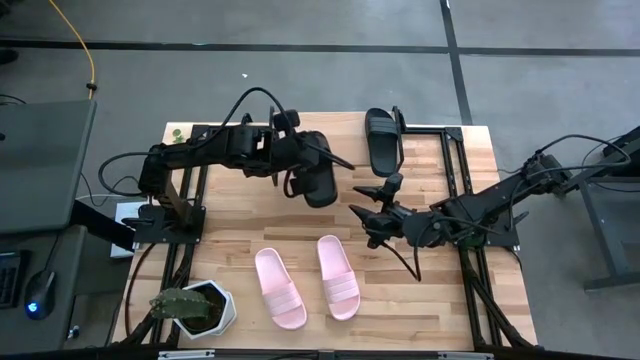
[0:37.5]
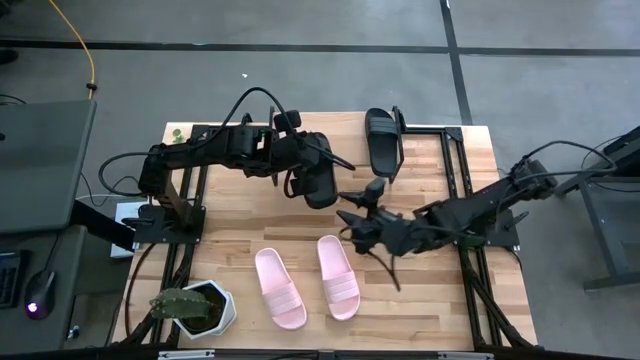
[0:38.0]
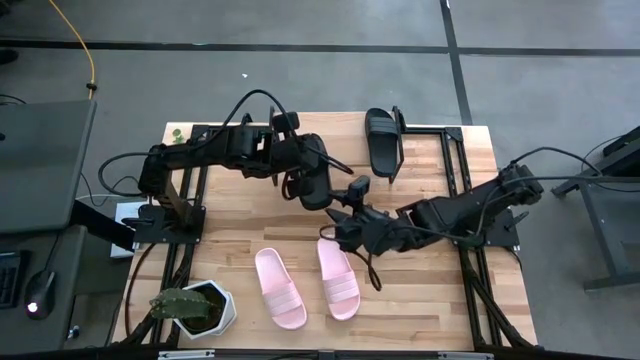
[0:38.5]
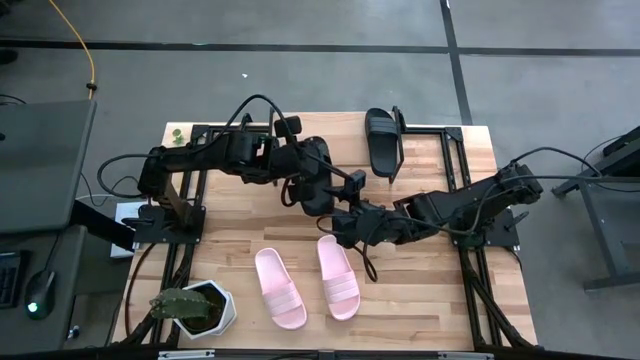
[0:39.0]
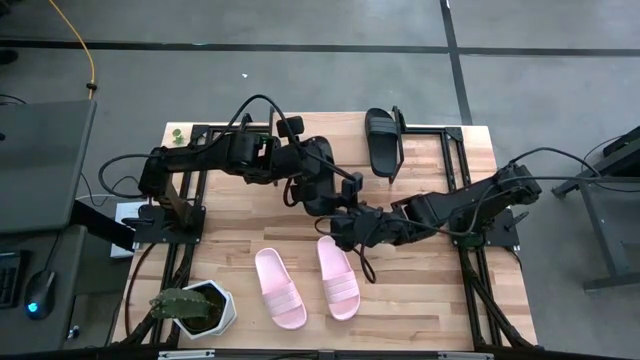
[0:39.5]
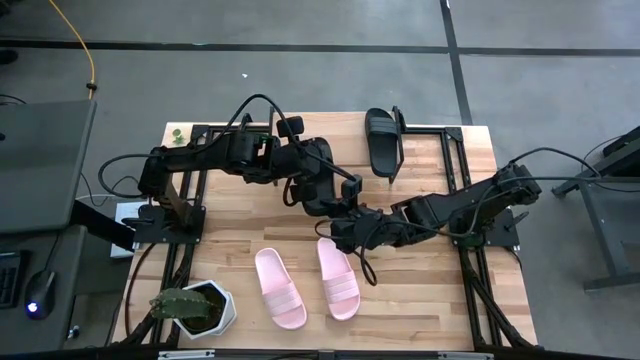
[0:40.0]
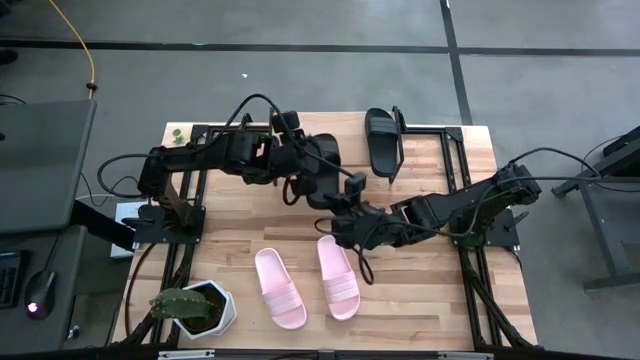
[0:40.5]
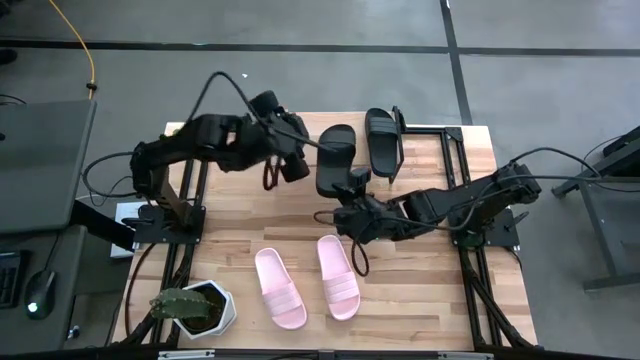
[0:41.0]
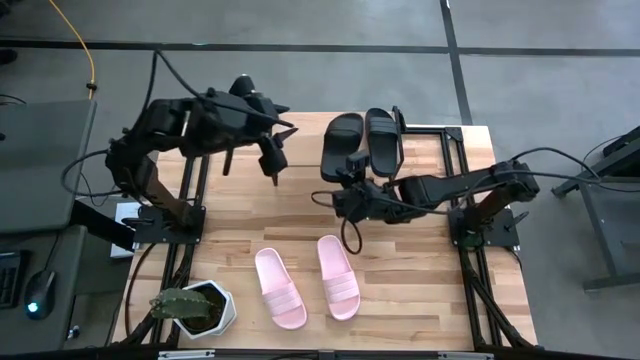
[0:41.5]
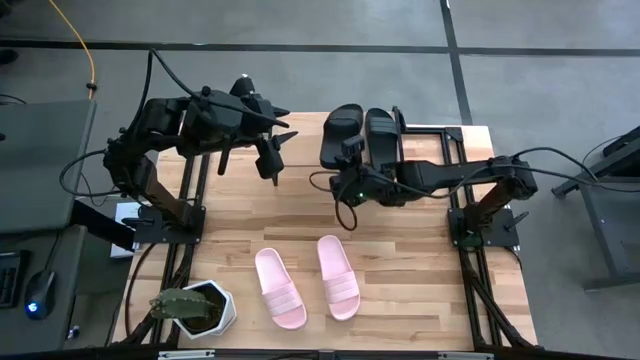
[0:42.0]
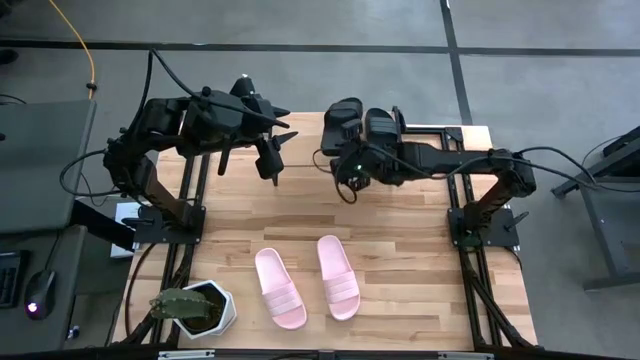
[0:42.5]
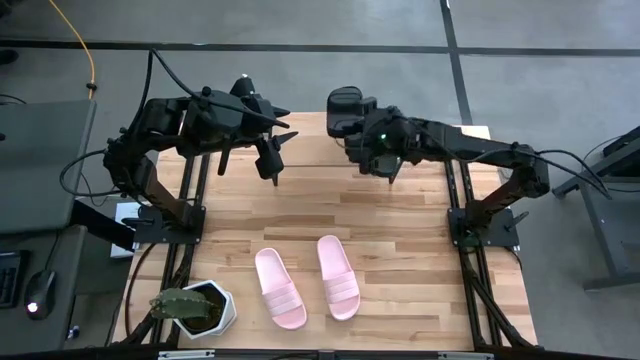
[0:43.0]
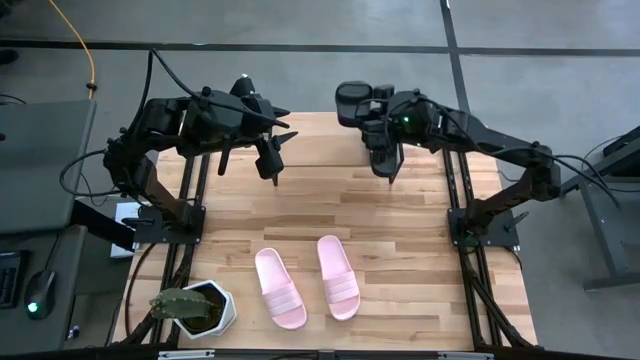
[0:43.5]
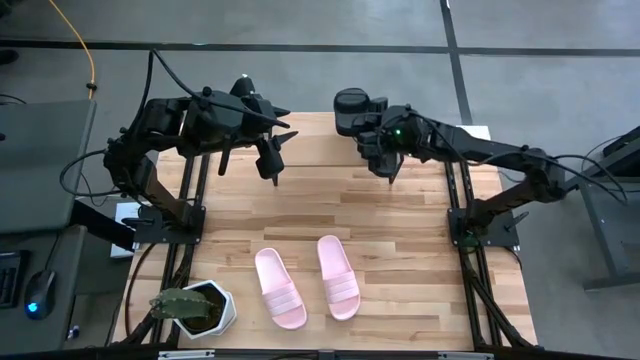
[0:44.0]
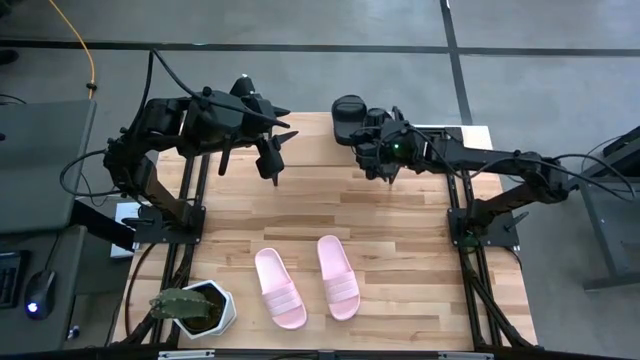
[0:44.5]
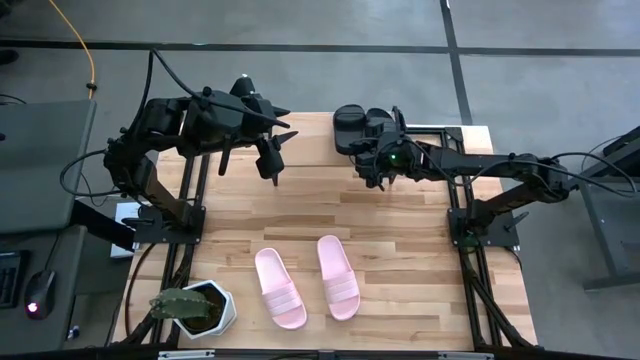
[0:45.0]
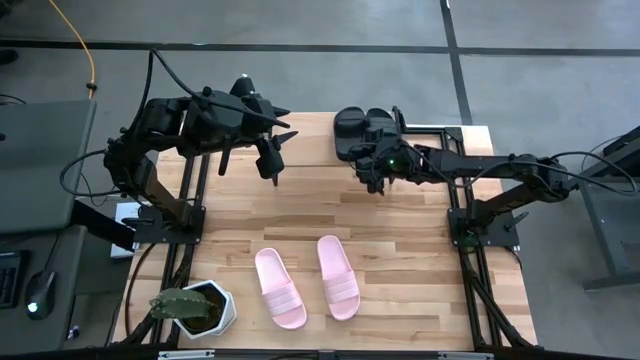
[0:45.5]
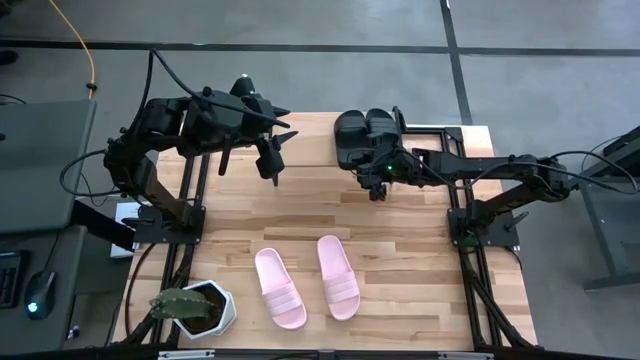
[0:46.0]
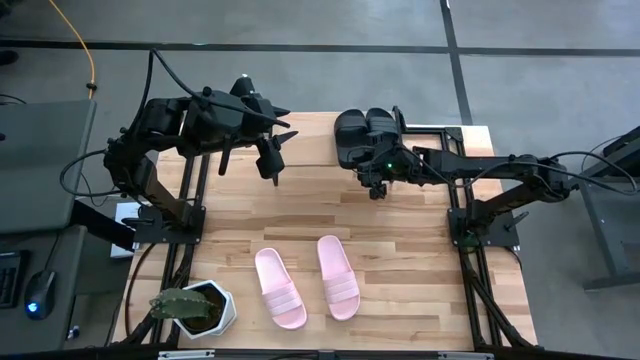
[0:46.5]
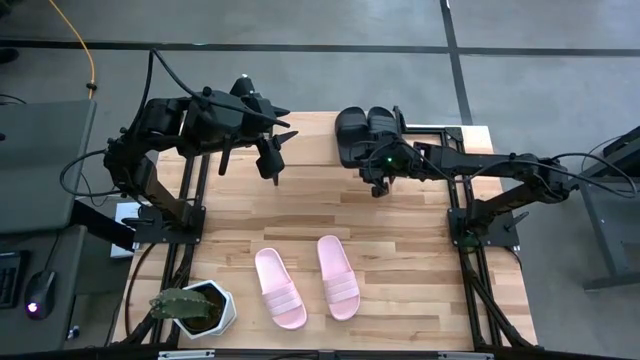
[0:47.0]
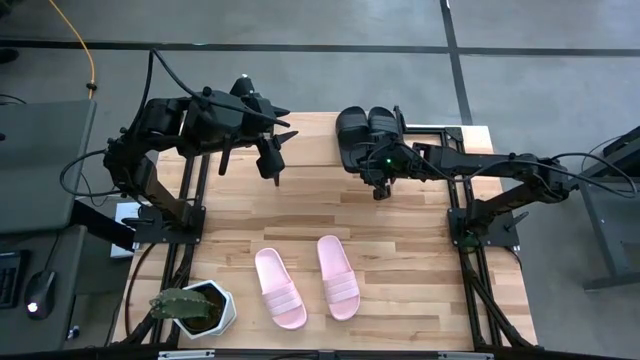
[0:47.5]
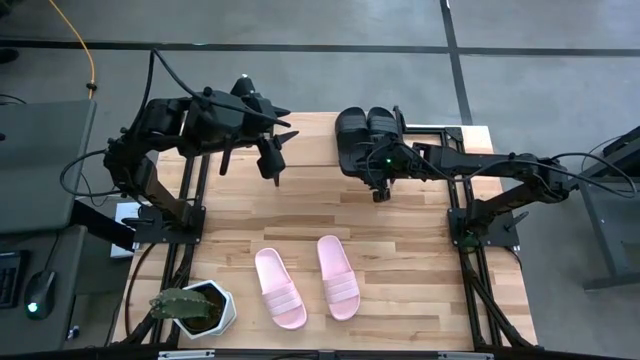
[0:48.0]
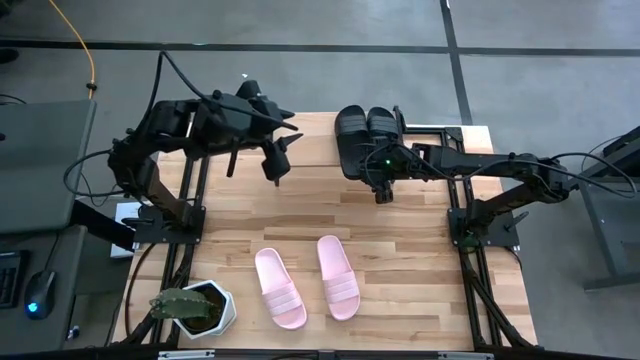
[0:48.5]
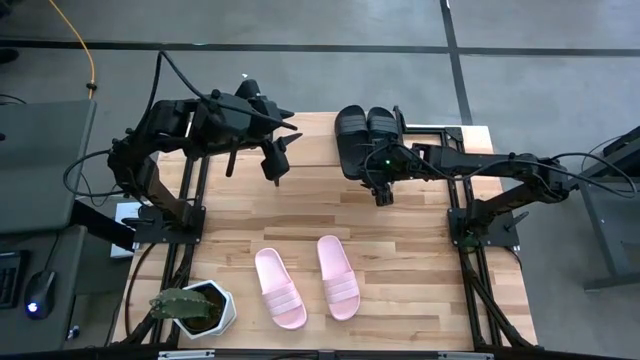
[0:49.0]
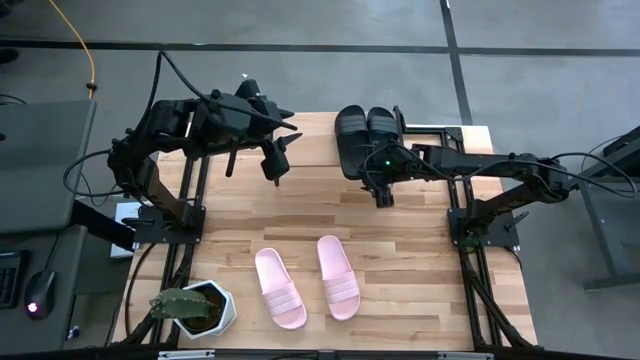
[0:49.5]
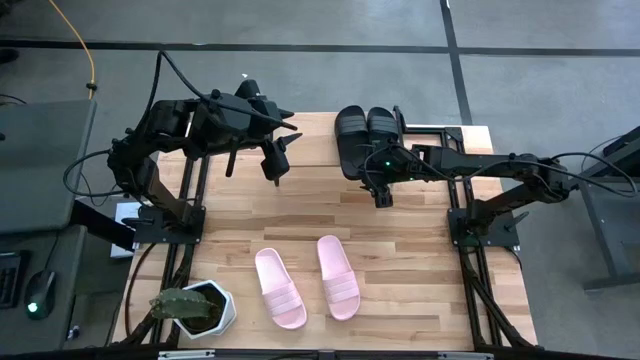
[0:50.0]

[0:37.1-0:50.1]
Task: Pick and place slides into the shelf
Put the black slide on the shelf

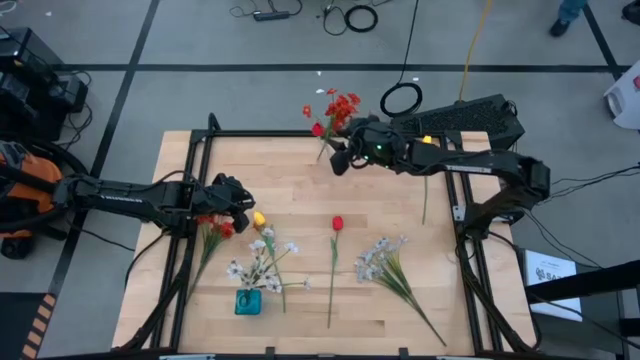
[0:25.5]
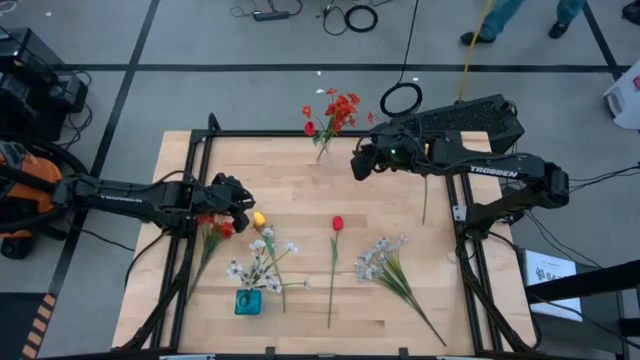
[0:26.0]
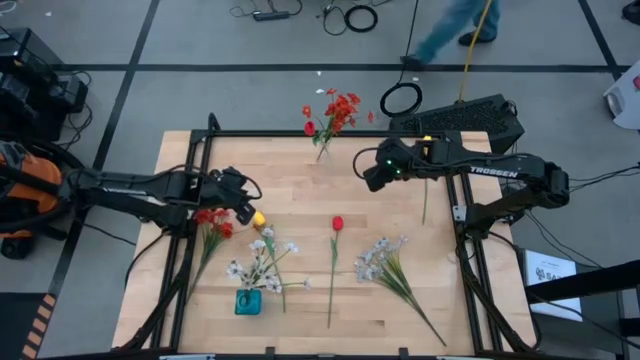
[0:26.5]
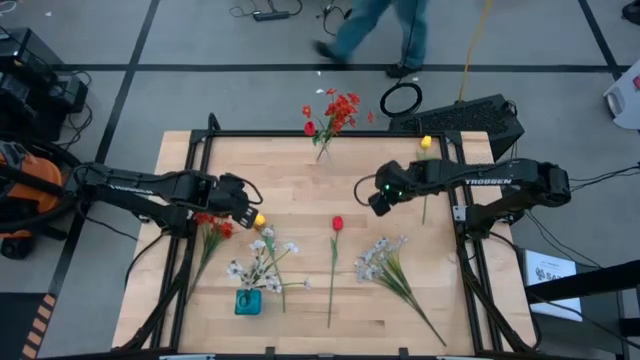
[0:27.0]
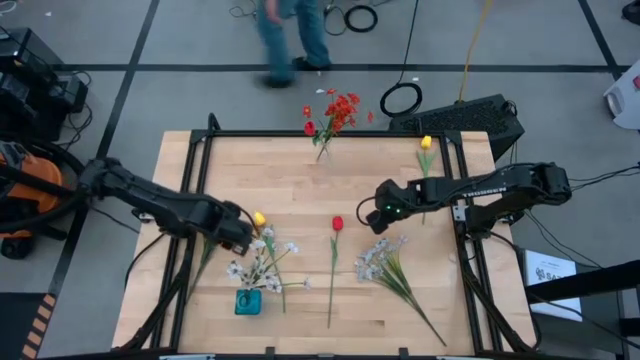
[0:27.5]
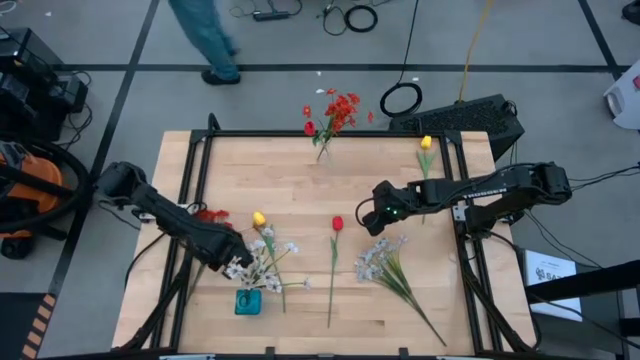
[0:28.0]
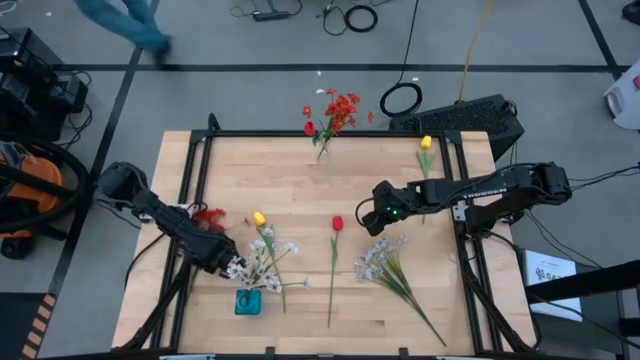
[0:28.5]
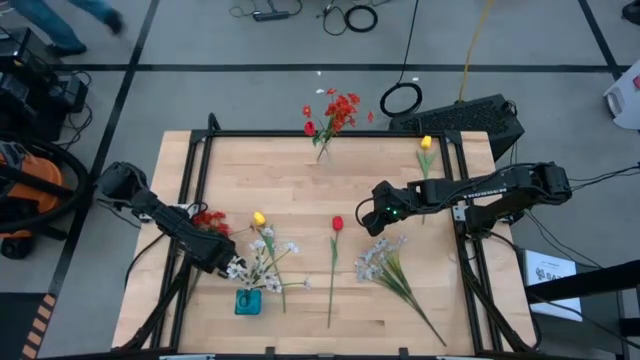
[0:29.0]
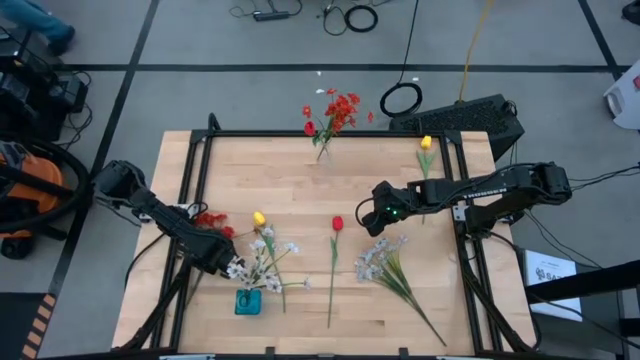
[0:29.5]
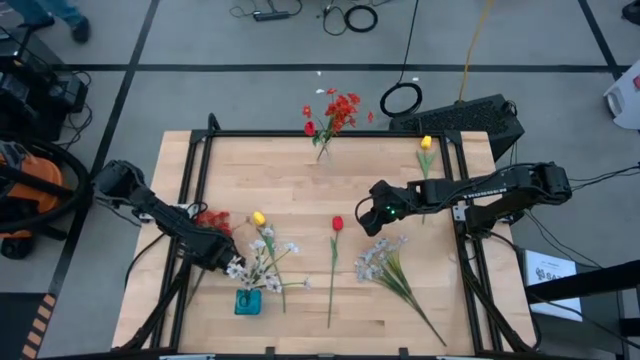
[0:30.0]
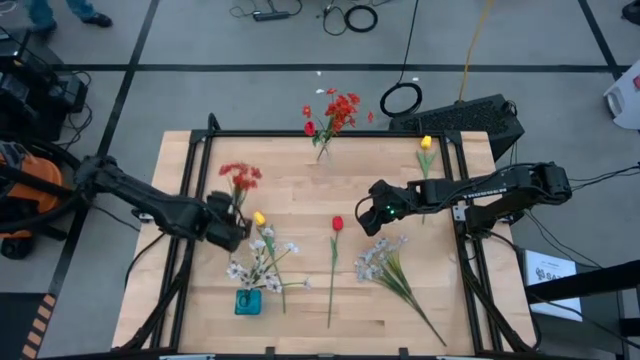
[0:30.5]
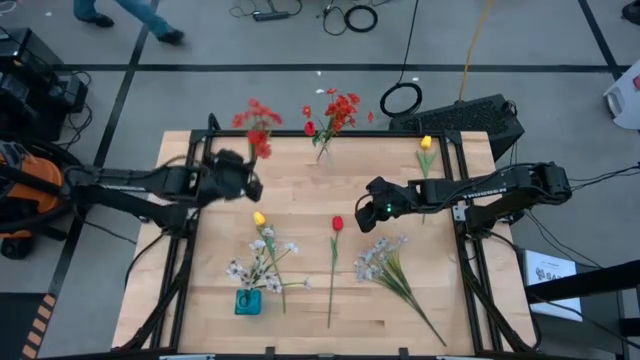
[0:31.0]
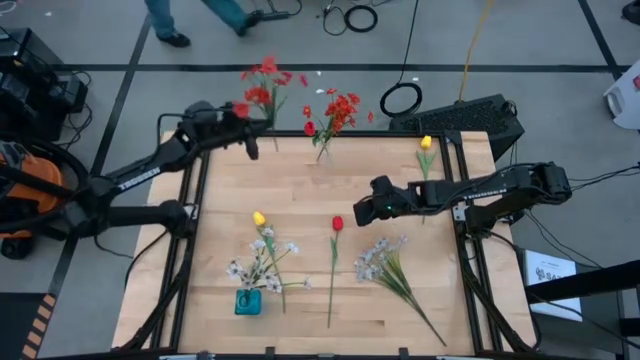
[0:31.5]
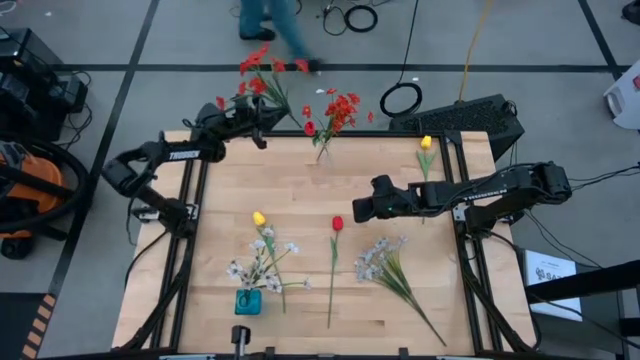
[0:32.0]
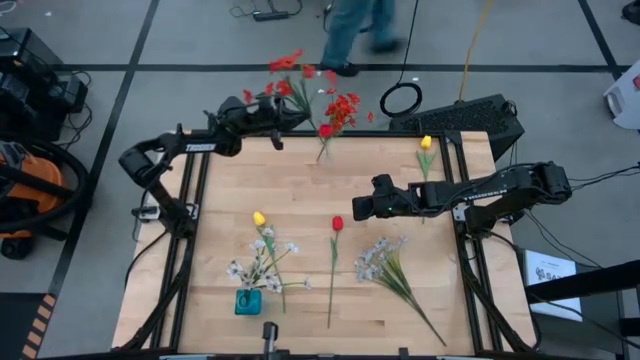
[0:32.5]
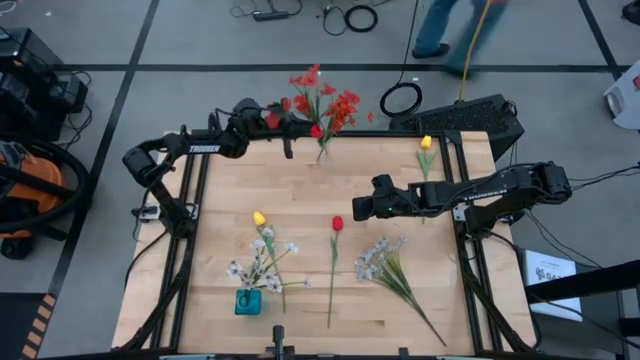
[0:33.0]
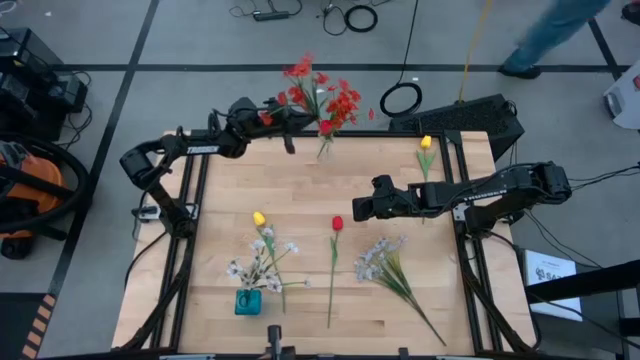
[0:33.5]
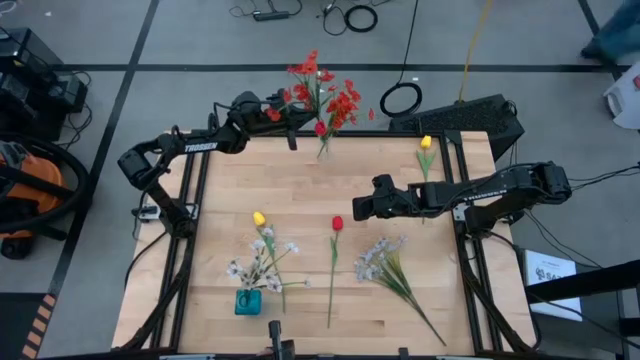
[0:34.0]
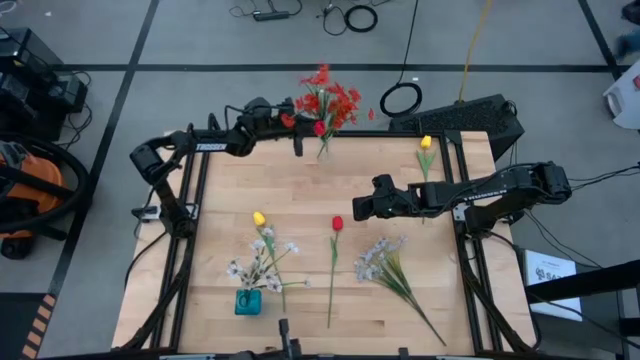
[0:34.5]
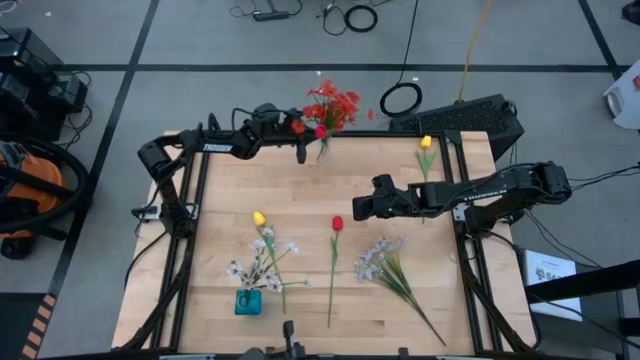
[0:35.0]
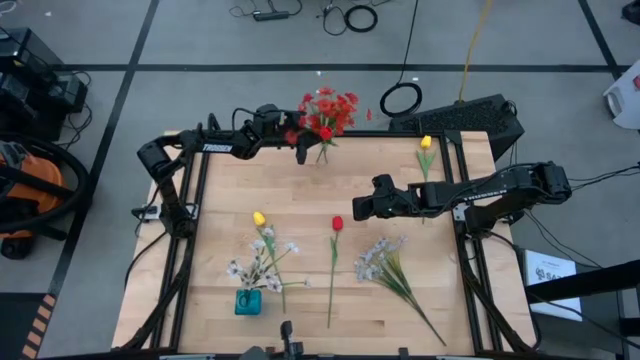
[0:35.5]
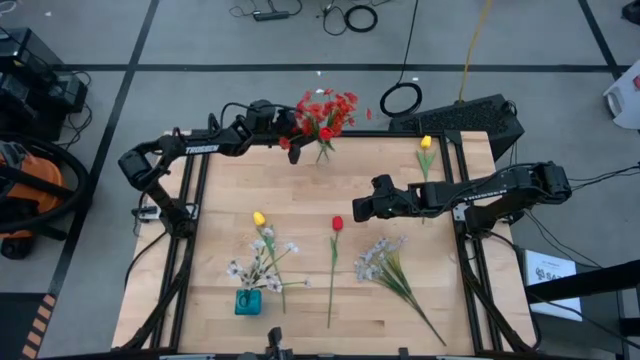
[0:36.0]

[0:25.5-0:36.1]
Task: Sort flowers into vase by color
Put the red flowers into the transparent vase
